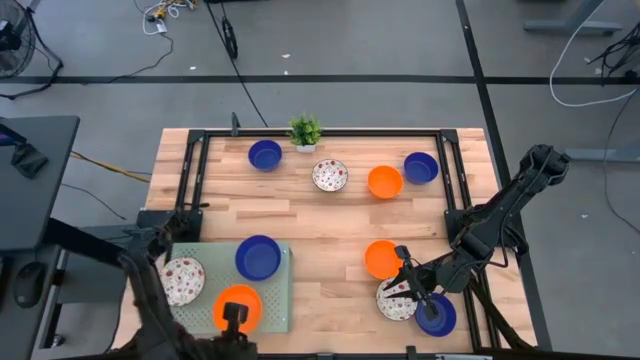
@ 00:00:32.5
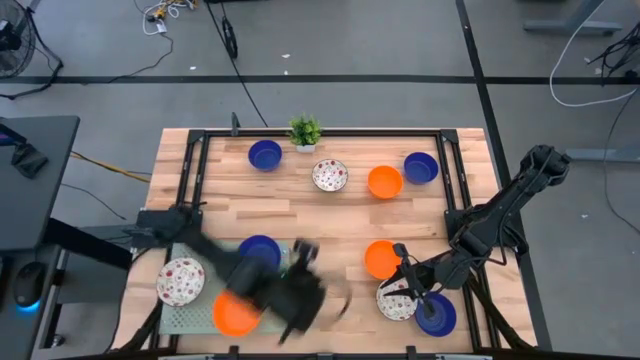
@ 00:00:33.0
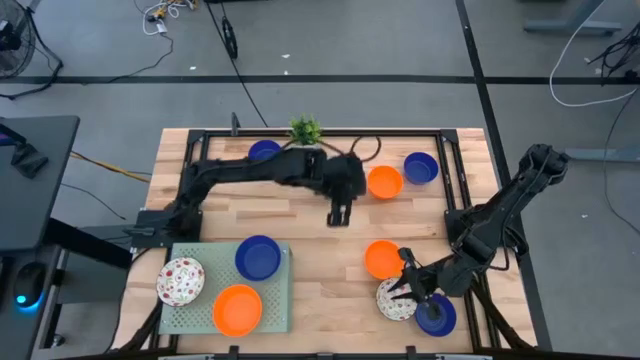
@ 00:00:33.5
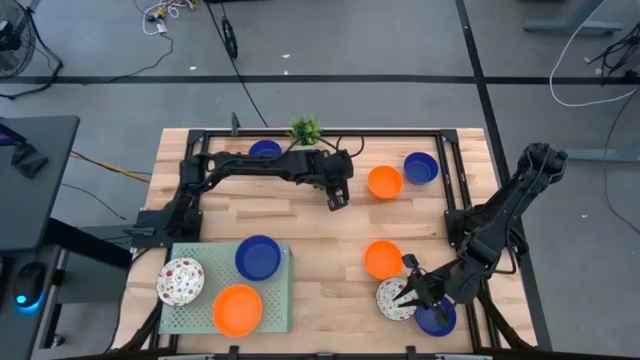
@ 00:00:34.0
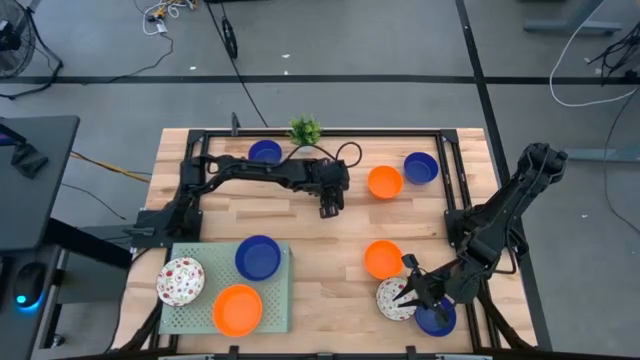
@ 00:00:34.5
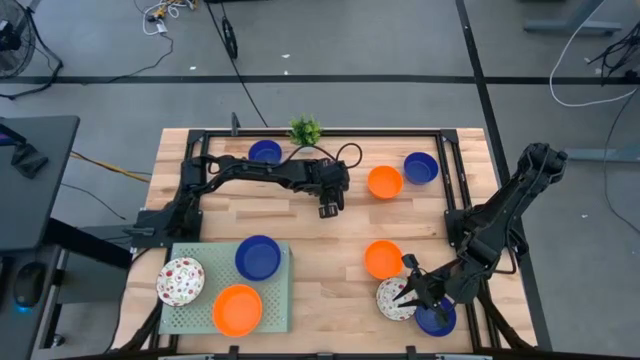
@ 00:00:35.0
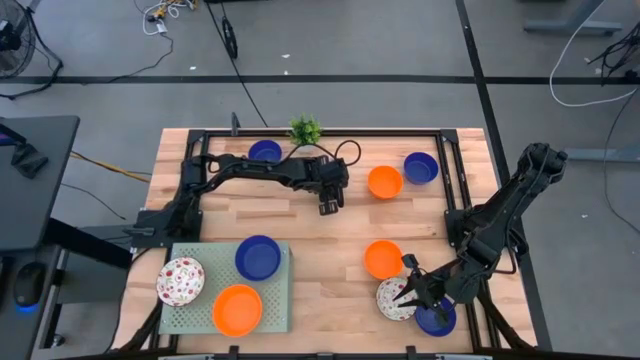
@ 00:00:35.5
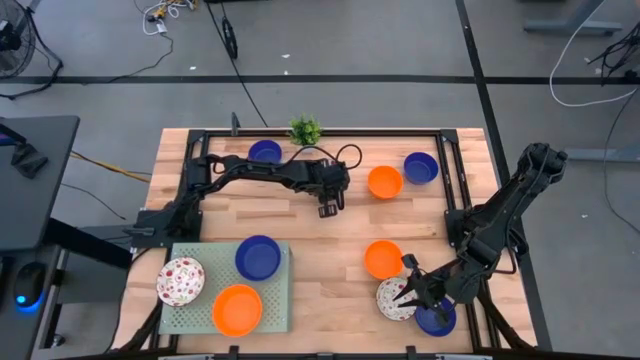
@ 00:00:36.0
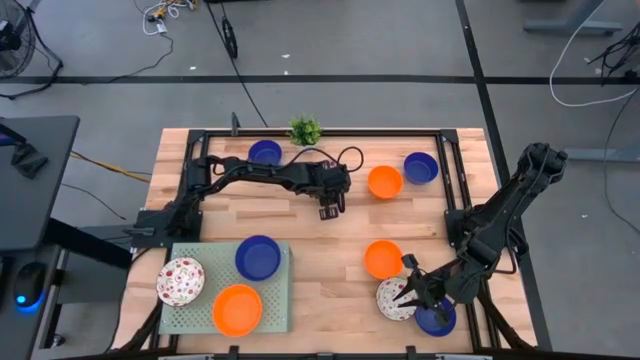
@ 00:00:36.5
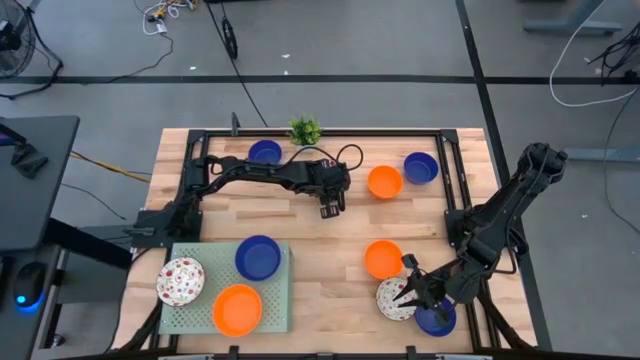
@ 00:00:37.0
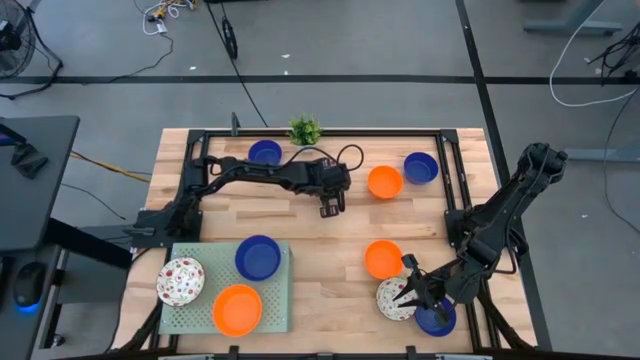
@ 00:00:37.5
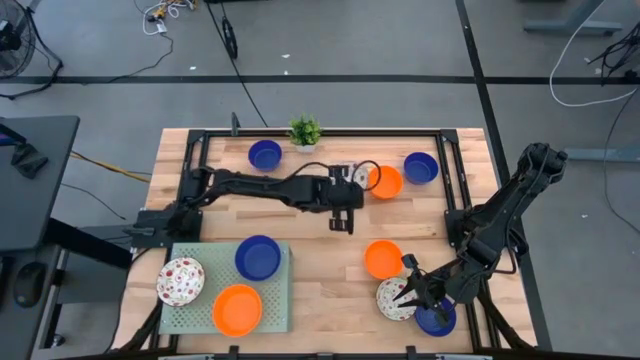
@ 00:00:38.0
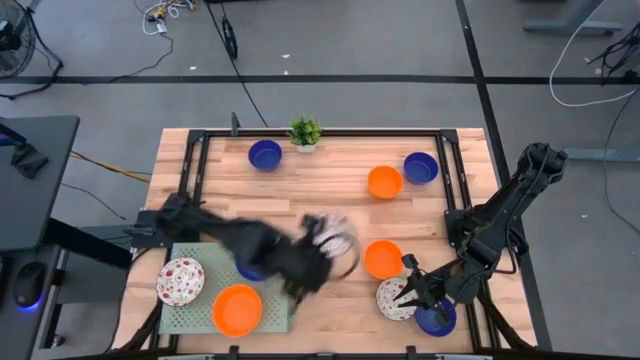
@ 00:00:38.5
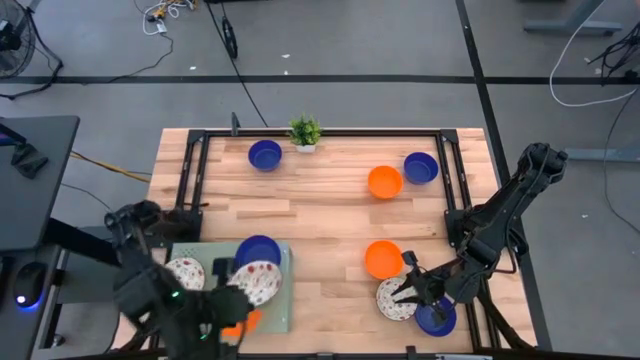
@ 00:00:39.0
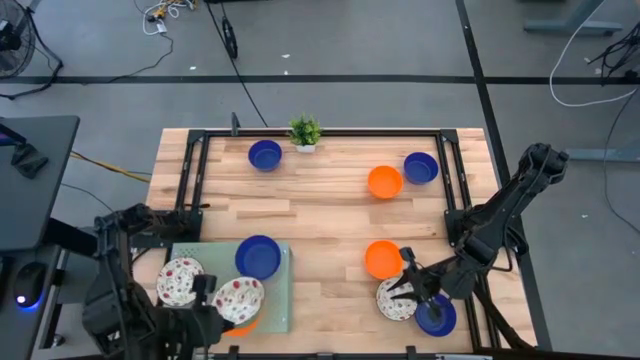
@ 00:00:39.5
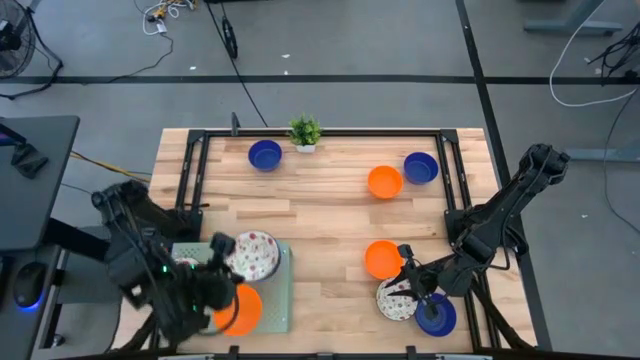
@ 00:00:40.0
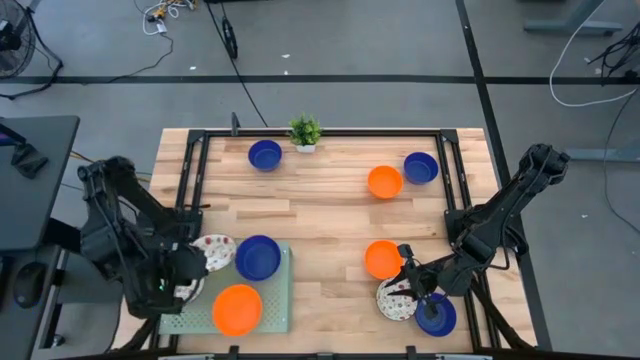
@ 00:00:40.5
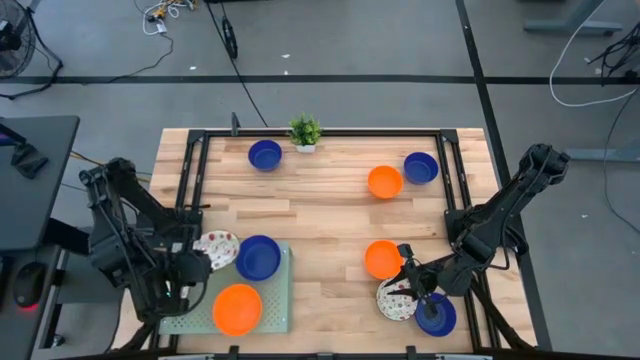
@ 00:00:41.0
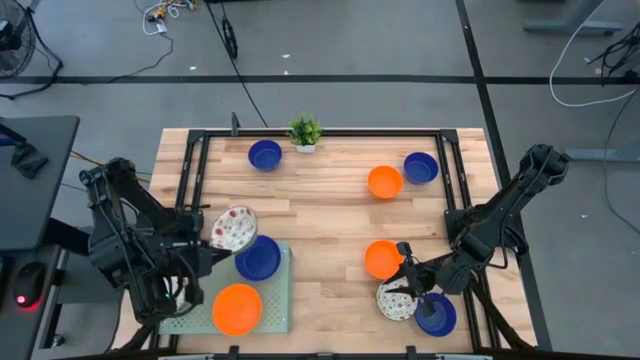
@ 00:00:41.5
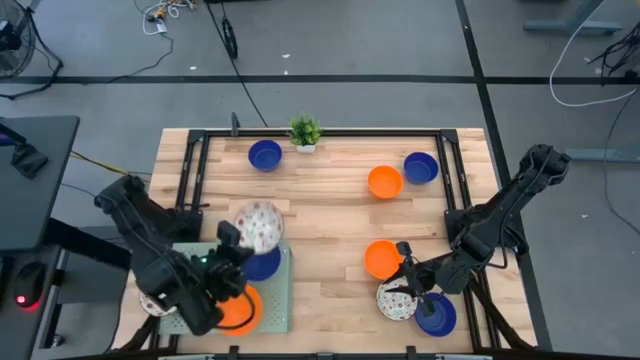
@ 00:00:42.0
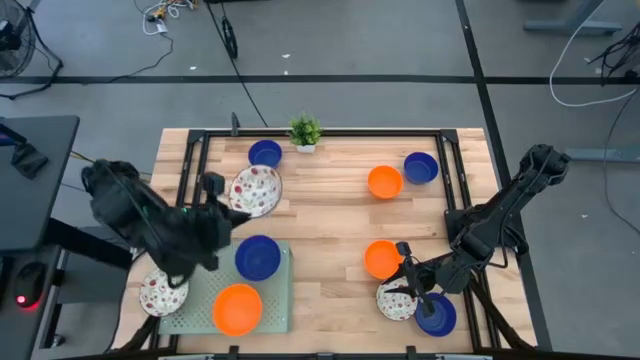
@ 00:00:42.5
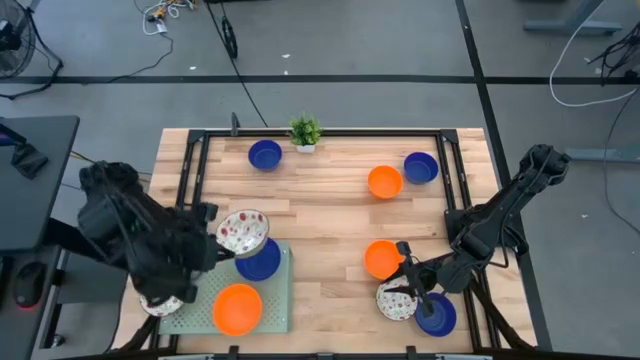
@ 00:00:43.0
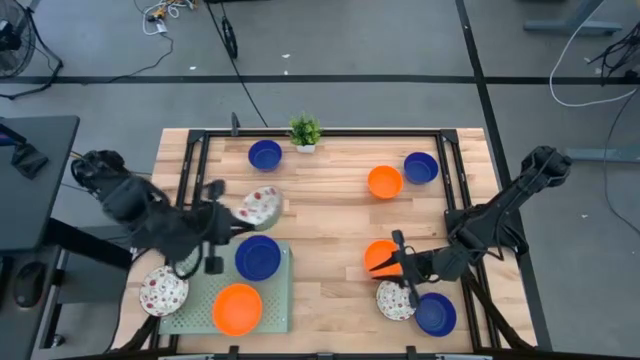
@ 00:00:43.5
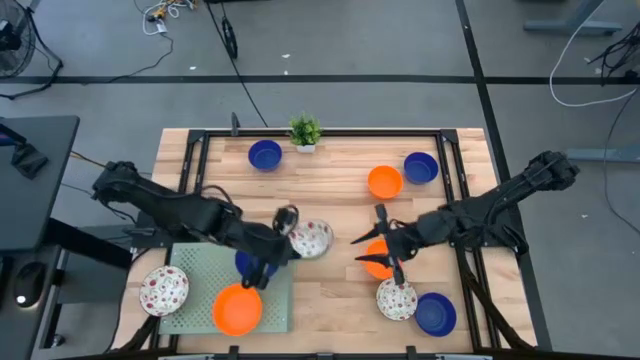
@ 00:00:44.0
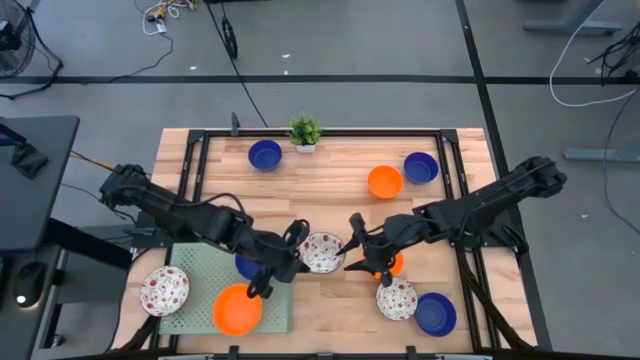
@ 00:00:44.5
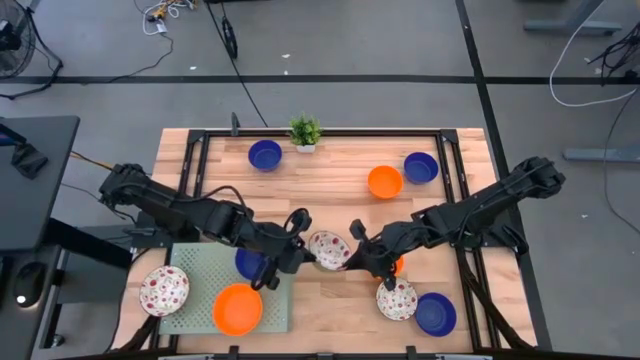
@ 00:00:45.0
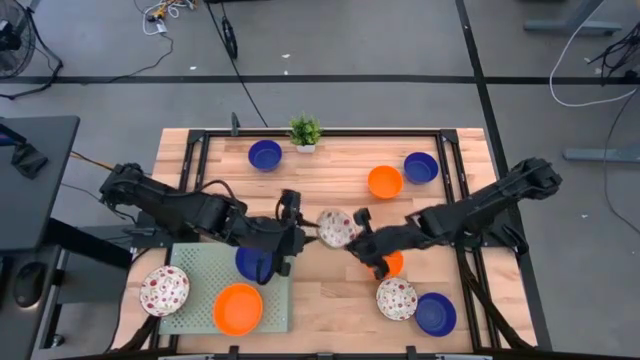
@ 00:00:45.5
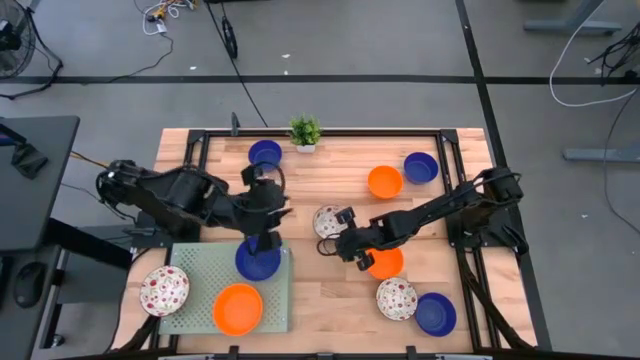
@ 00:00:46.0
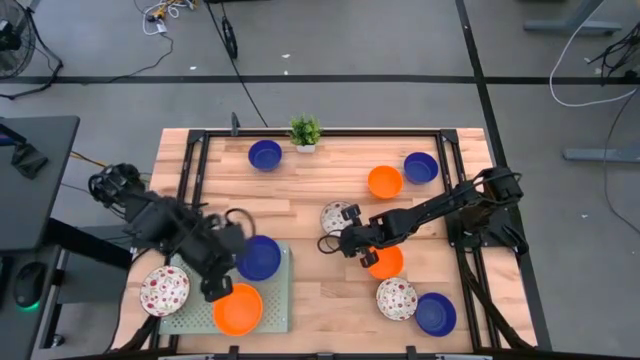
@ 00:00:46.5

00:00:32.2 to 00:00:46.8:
Task: Pick & Place Mini bowls
Stack the white bowl on top of the white bowl on the shelf

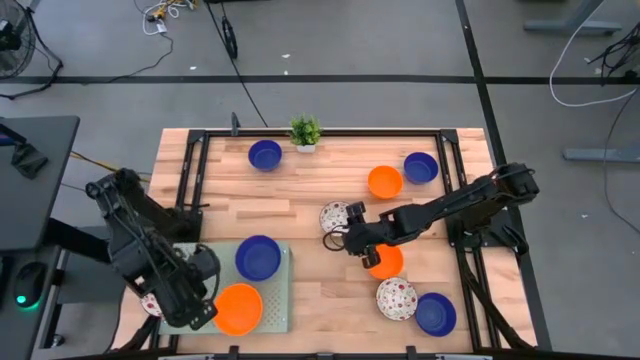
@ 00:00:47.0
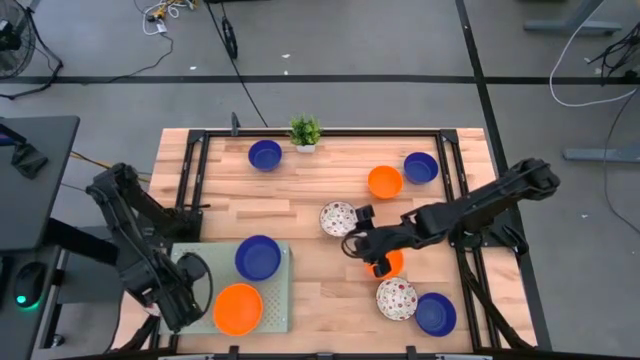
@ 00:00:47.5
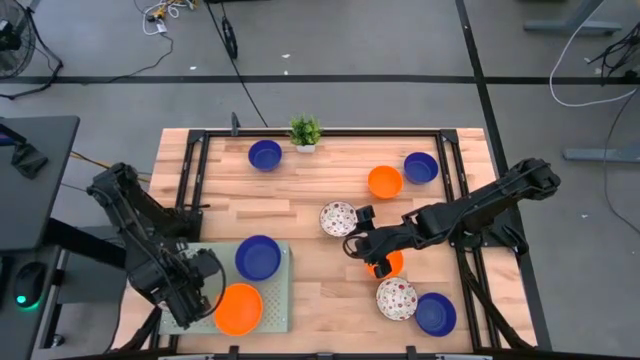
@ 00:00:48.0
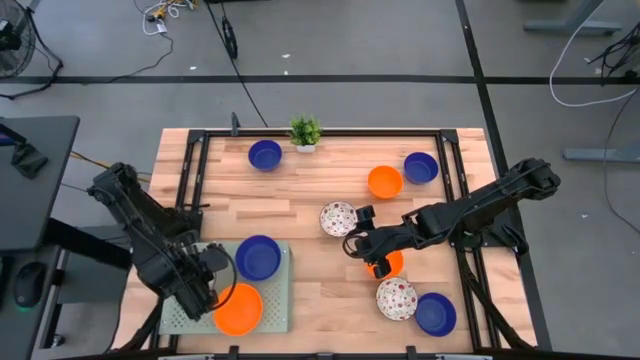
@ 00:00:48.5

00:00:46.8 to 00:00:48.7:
Adjust the white bowl on the shelf

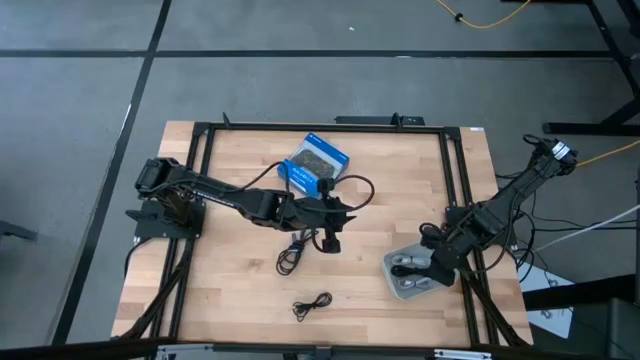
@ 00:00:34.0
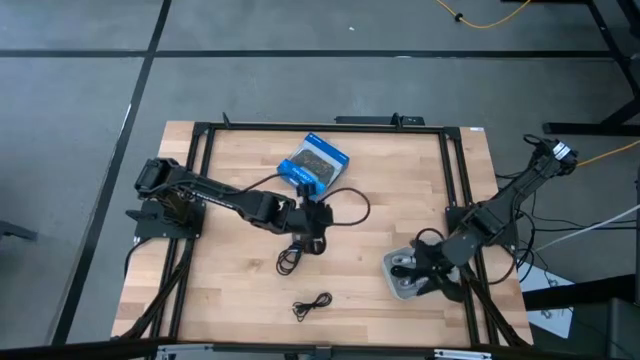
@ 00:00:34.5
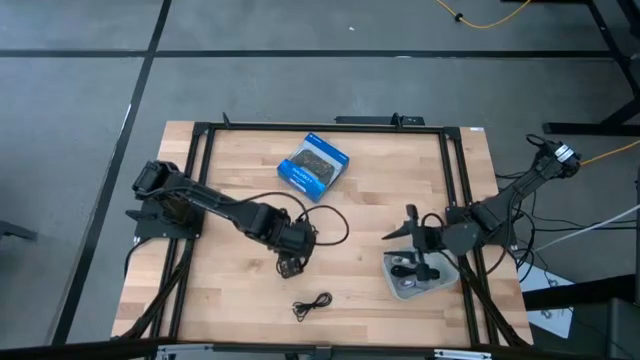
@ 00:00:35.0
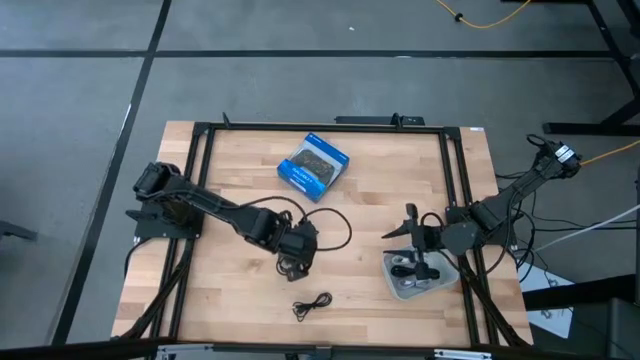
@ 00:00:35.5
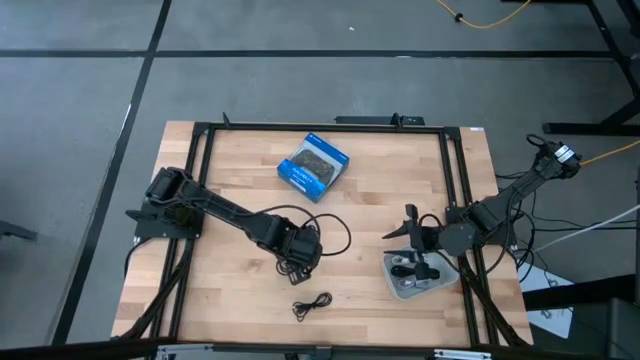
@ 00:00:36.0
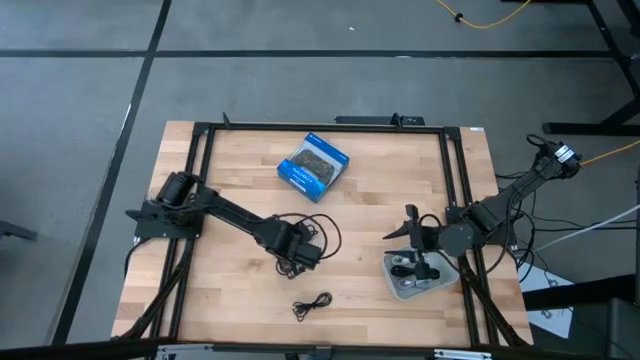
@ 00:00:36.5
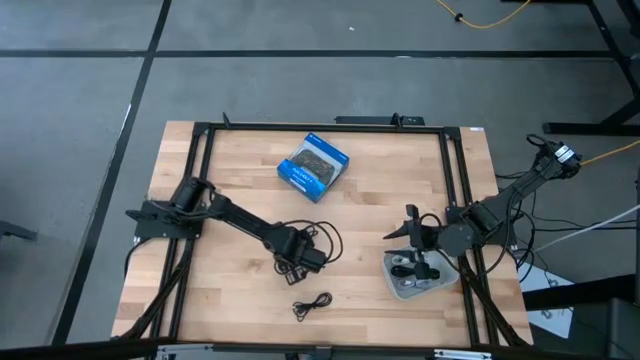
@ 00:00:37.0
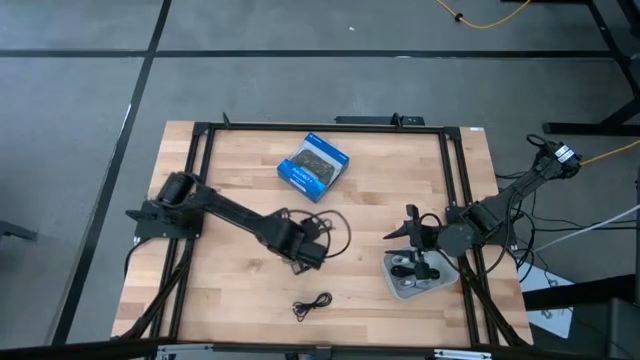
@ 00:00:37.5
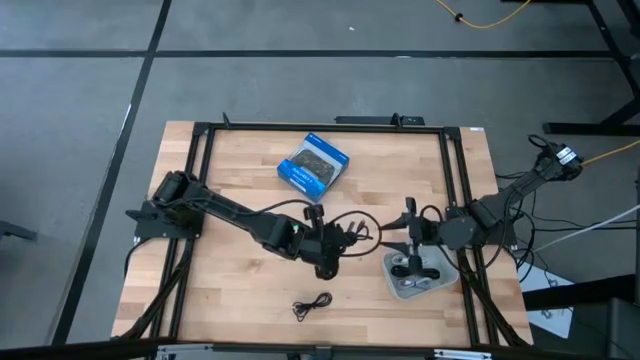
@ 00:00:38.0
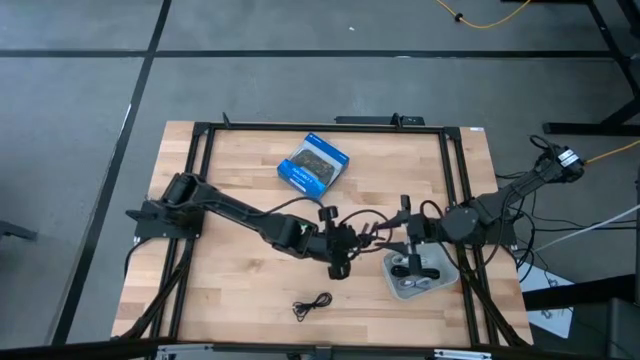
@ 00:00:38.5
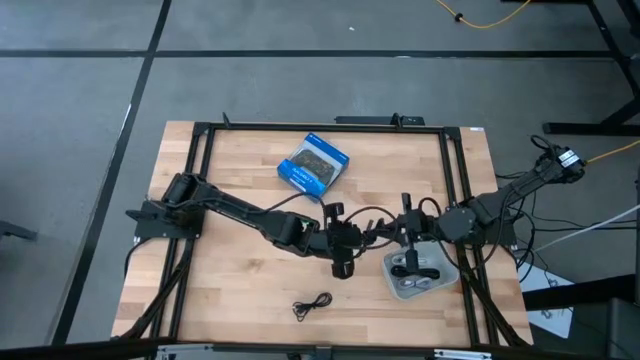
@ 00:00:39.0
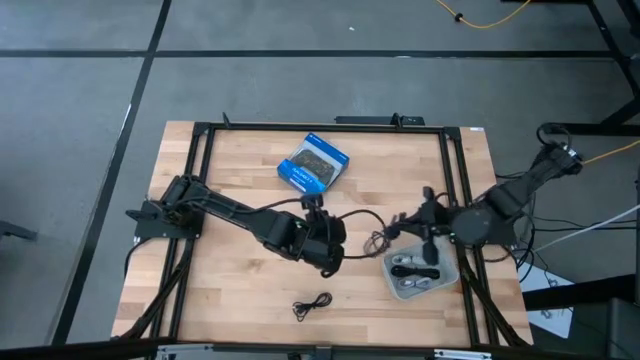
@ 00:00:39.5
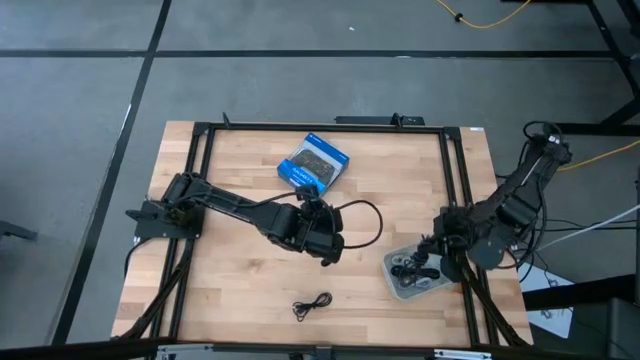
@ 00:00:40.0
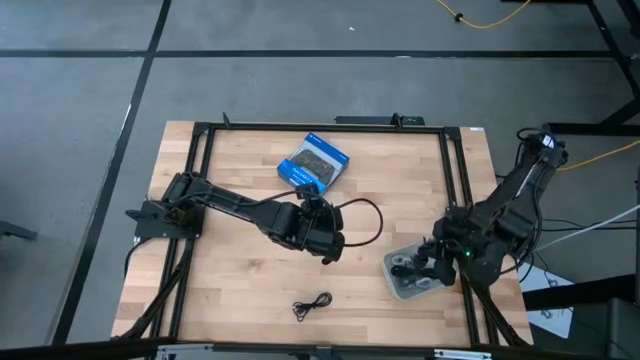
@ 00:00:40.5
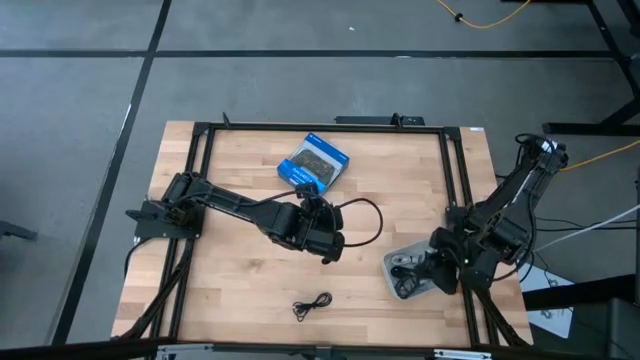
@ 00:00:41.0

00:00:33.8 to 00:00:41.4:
Task: Pick and place USB-C Cables
Put the black and white charger cable into the gray bin
